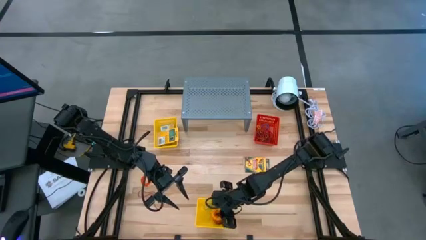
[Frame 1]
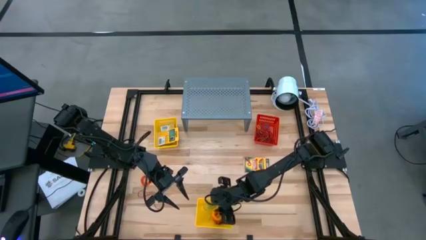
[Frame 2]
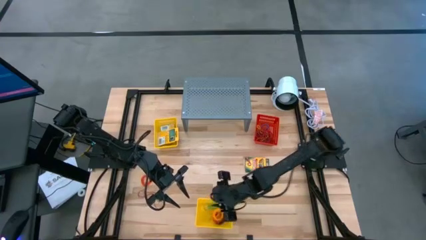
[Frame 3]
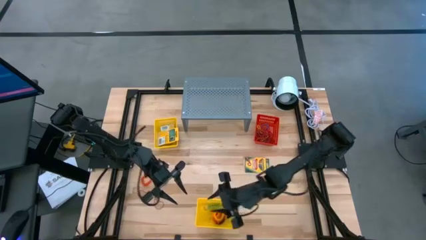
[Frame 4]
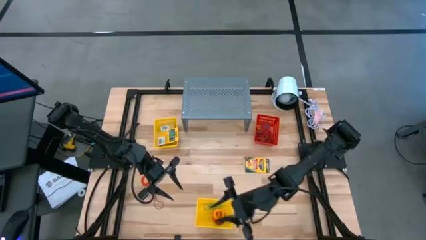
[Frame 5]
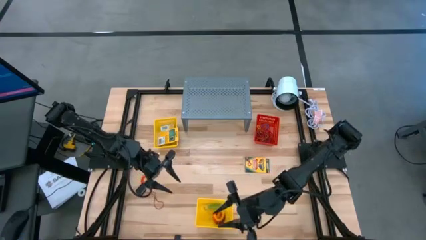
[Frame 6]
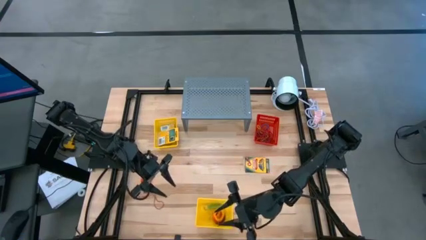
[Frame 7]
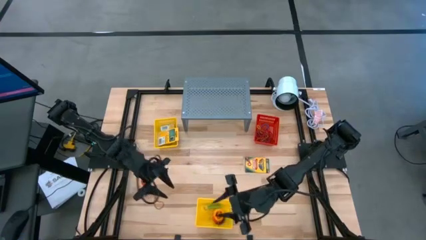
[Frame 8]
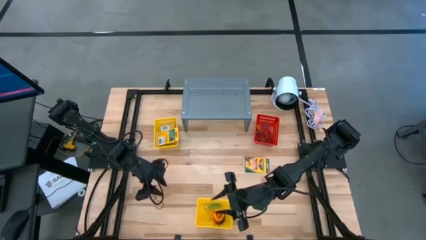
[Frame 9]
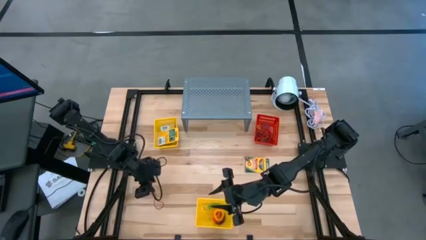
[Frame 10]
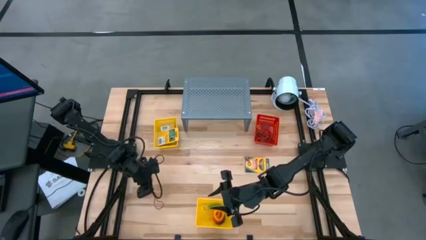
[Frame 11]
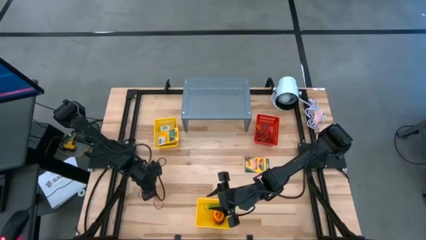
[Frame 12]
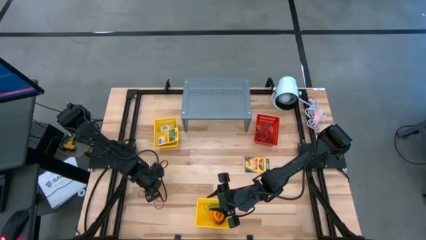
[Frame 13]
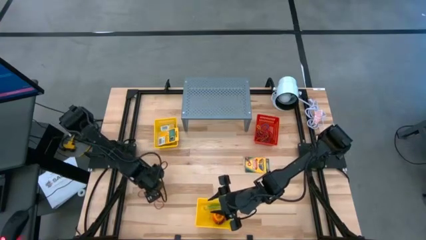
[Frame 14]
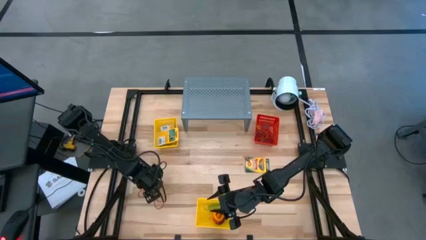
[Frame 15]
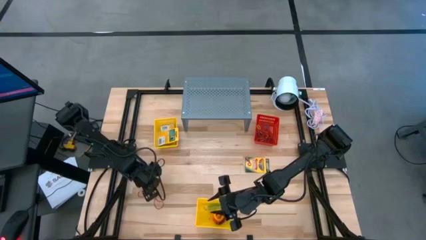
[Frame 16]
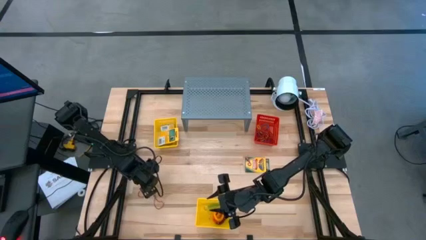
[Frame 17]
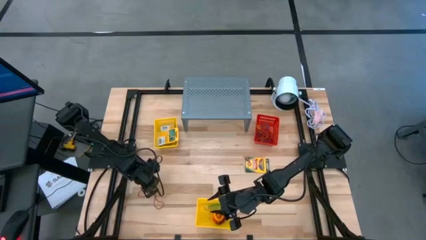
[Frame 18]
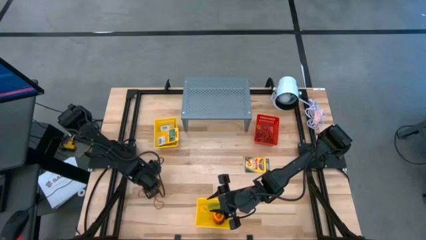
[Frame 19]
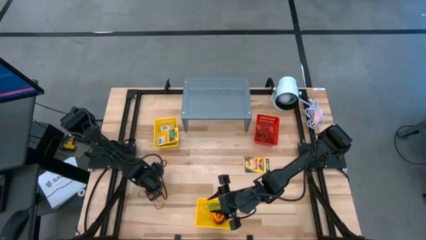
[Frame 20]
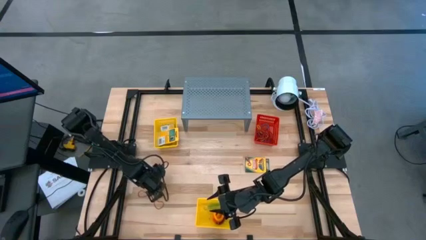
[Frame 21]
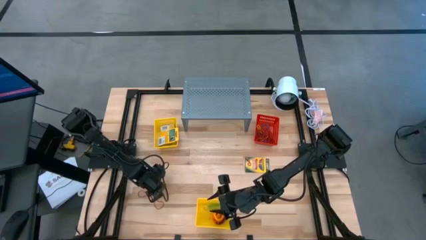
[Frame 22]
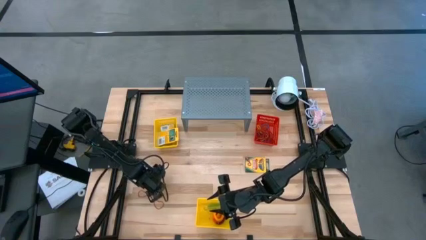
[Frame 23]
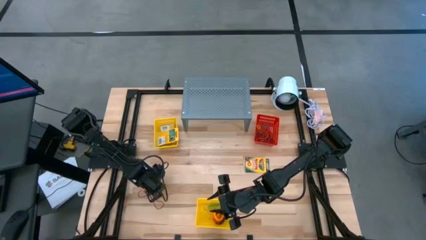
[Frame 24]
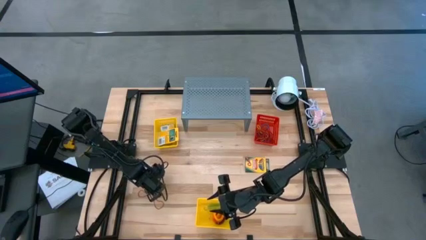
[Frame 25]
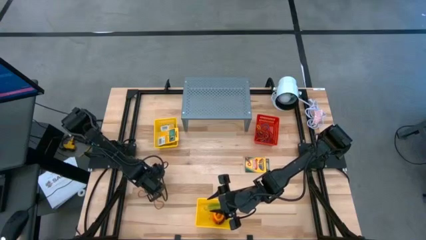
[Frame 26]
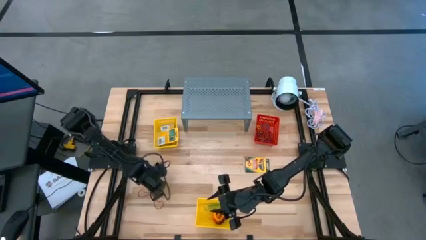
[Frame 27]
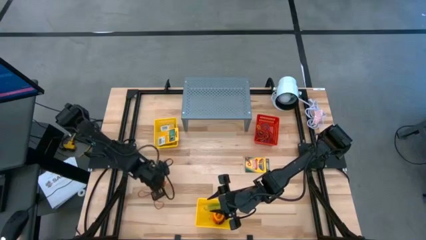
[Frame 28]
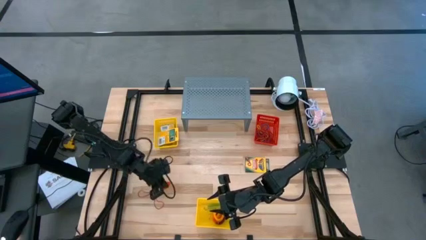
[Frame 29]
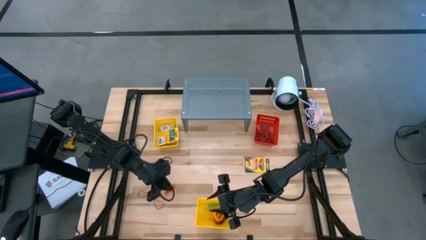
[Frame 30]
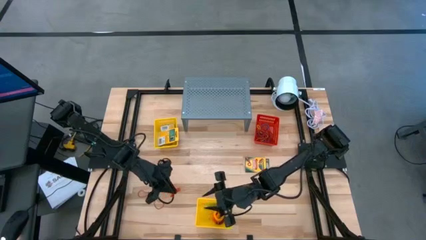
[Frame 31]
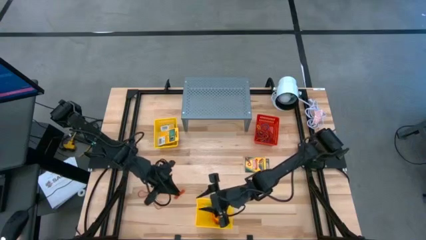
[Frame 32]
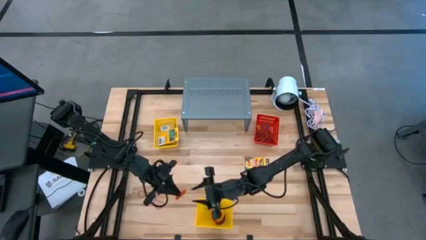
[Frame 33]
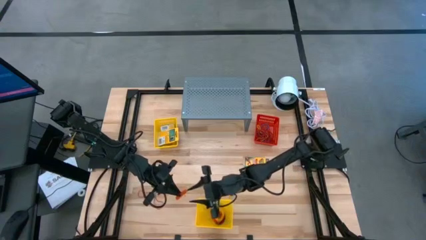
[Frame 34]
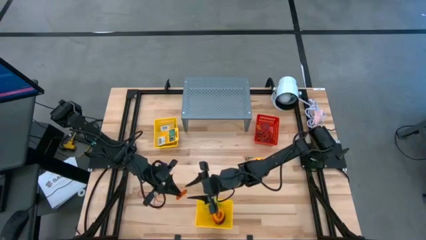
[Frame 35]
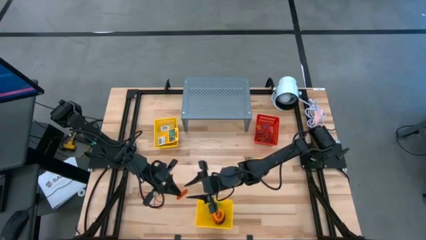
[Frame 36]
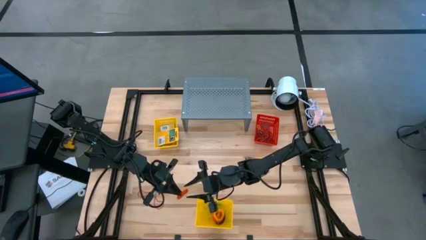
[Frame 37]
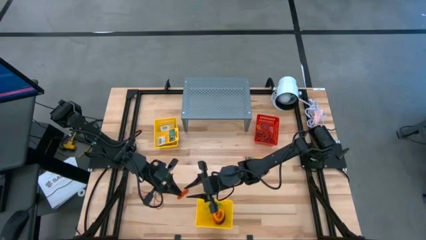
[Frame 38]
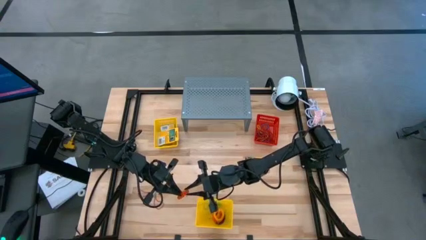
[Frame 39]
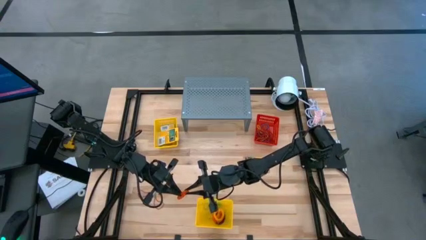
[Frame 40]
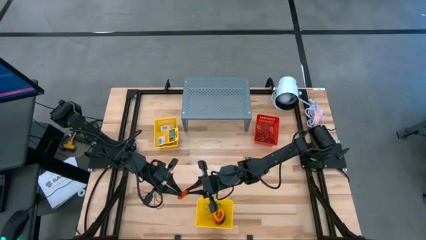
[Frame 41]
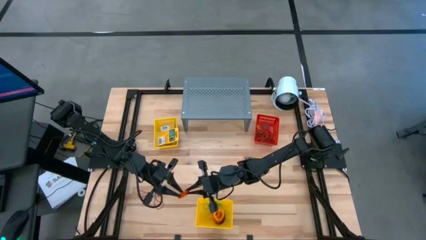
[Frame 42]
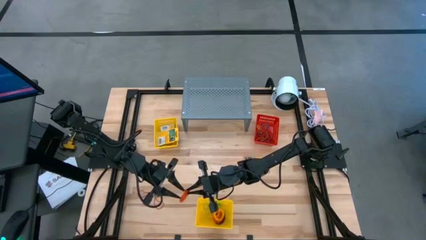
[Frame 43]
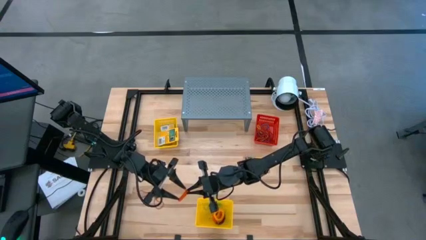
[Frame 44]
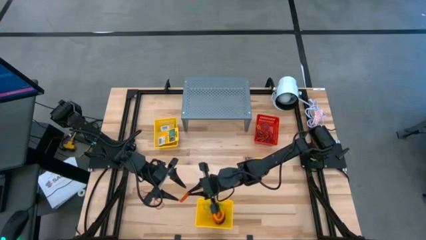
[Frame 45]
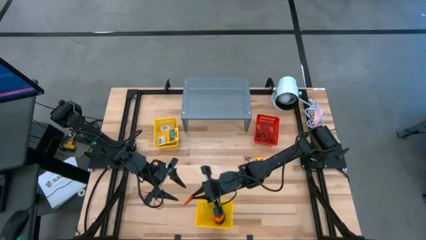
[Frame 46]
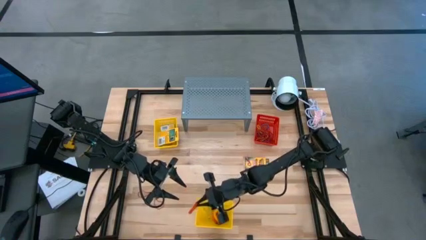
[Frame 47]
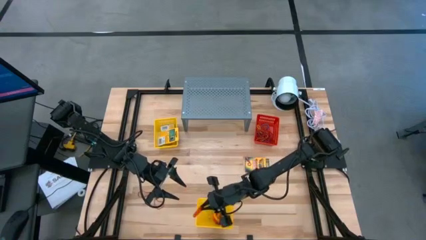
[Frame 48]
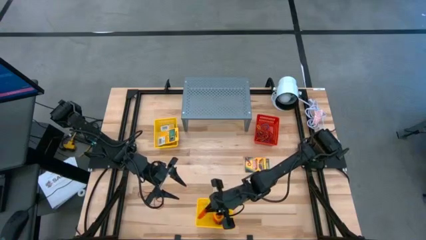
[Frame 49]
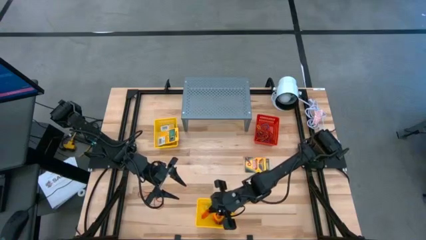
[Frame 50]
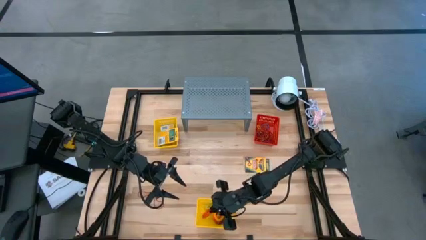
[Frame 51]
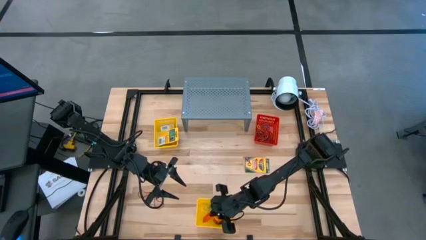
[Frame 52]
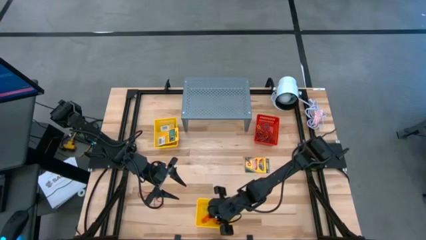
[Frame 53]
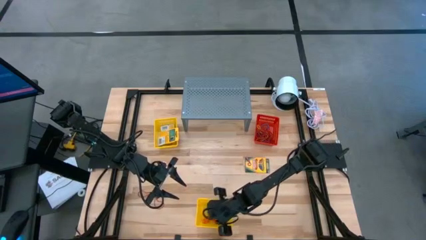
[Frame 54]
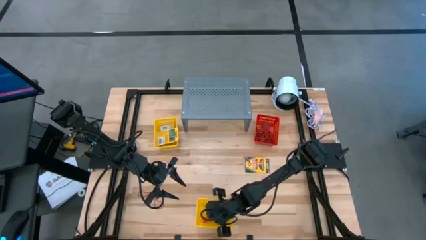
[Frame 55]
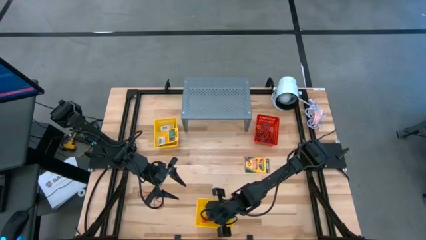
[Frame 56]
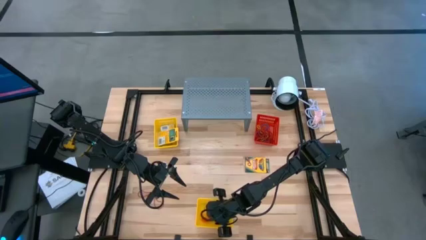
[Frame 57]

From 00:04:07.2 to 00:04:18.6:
Task: Pick & Place Office Desk Supplies
Put the orange spiral keychain into the bottom yellow bin
